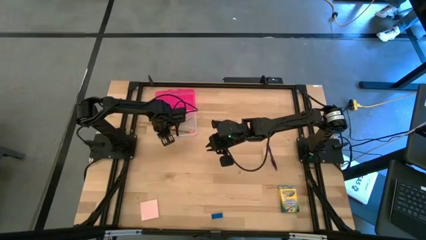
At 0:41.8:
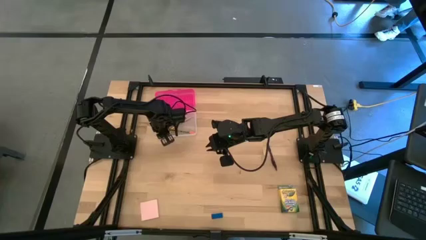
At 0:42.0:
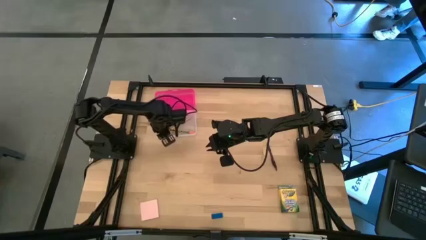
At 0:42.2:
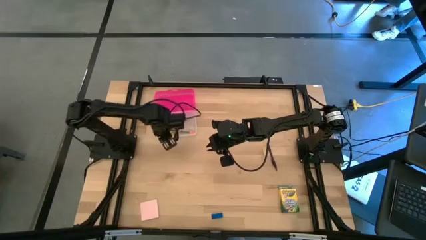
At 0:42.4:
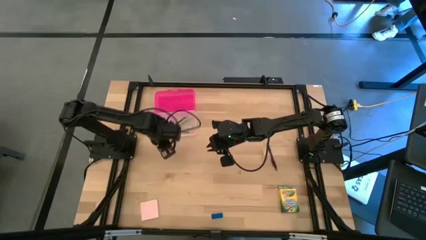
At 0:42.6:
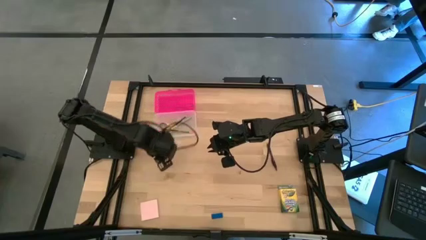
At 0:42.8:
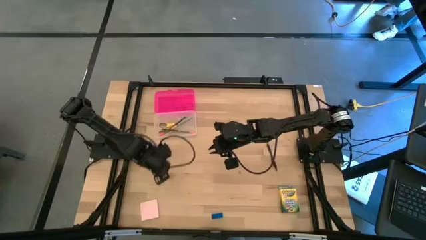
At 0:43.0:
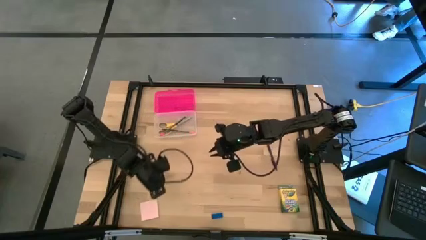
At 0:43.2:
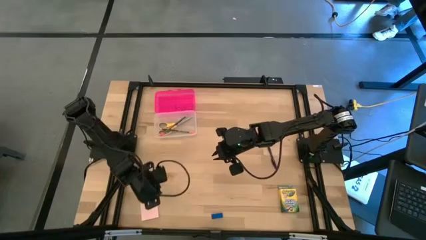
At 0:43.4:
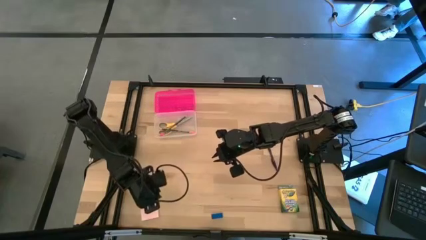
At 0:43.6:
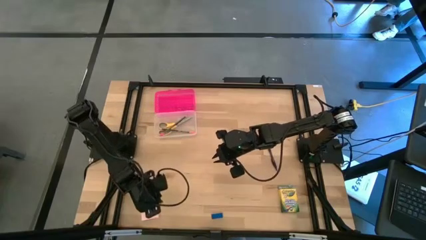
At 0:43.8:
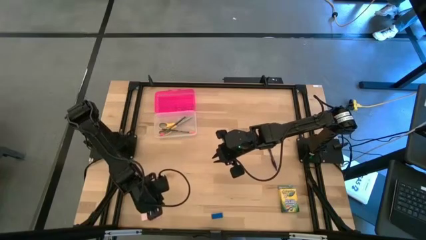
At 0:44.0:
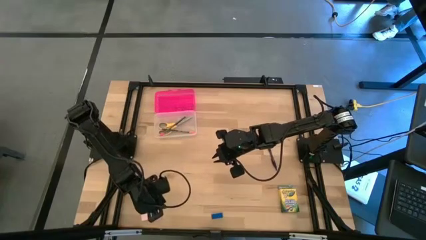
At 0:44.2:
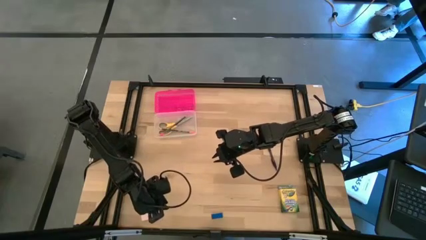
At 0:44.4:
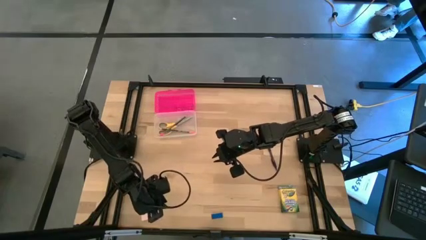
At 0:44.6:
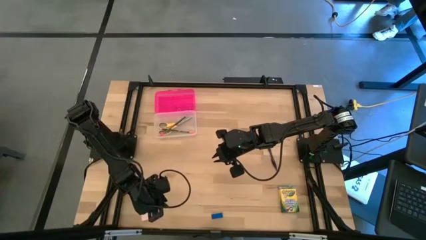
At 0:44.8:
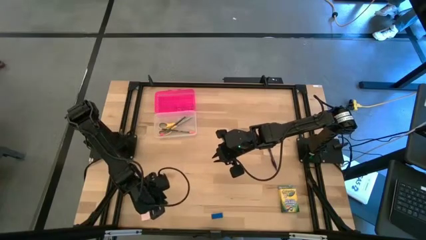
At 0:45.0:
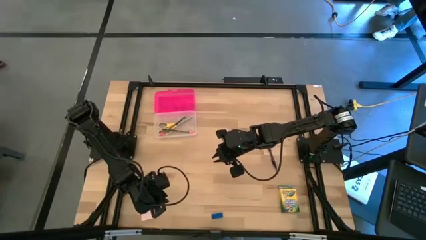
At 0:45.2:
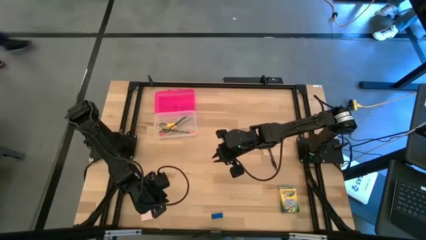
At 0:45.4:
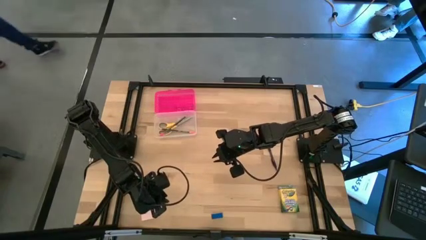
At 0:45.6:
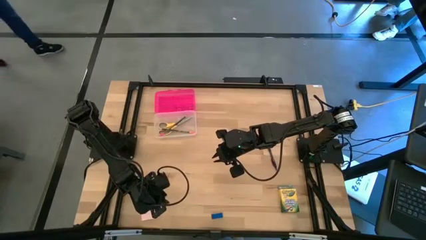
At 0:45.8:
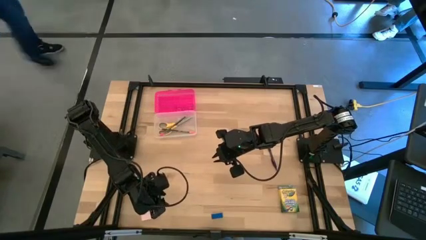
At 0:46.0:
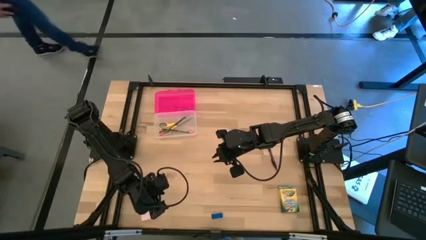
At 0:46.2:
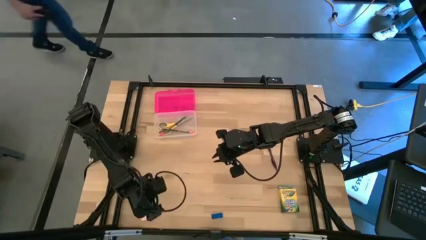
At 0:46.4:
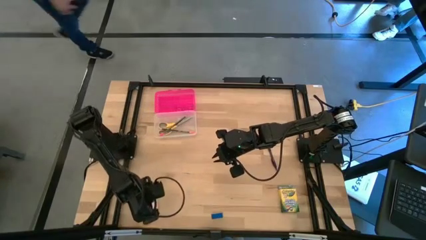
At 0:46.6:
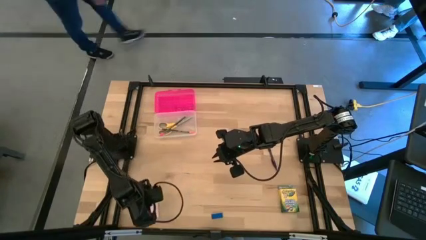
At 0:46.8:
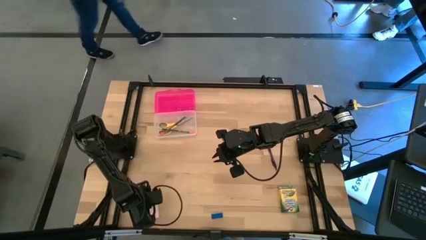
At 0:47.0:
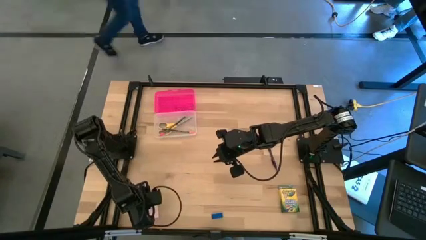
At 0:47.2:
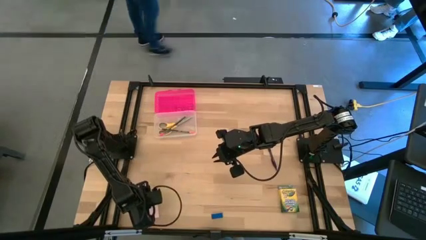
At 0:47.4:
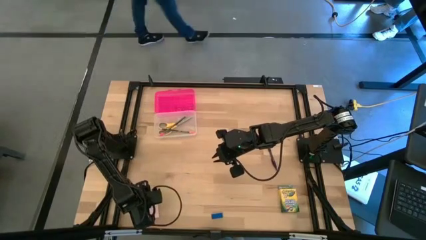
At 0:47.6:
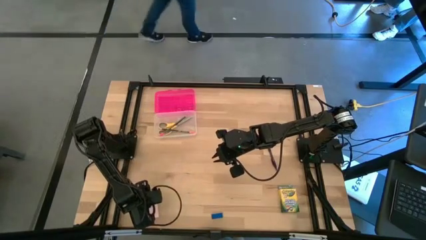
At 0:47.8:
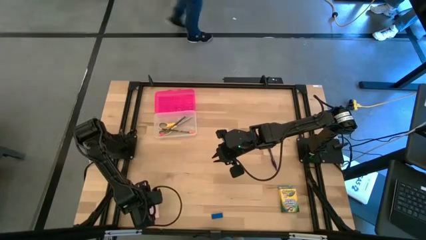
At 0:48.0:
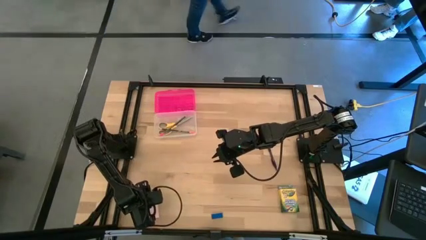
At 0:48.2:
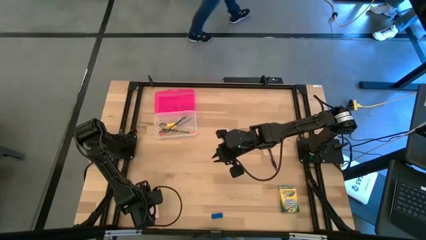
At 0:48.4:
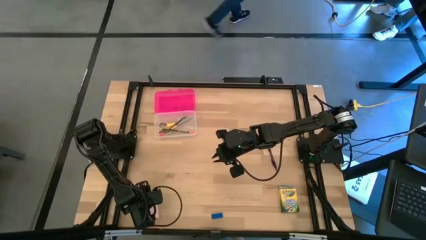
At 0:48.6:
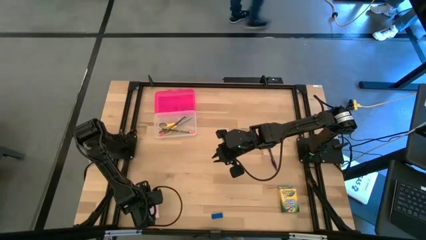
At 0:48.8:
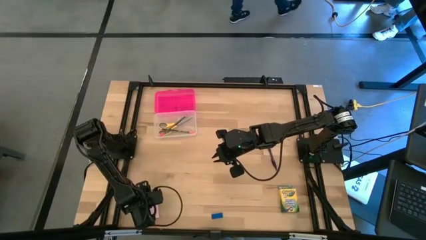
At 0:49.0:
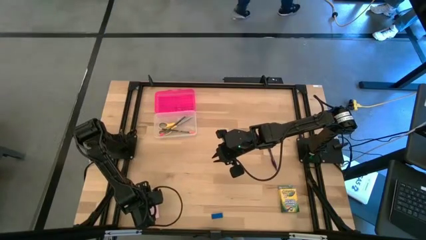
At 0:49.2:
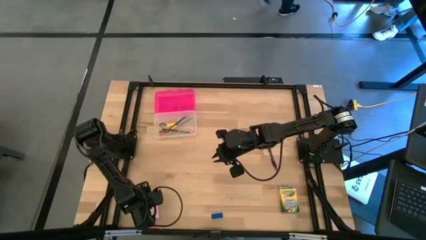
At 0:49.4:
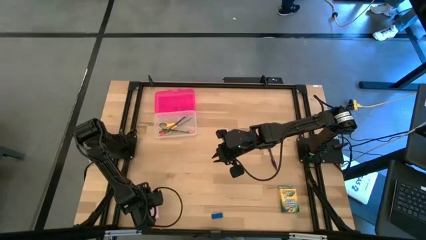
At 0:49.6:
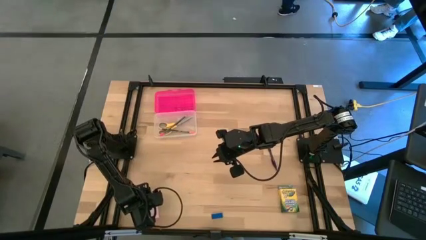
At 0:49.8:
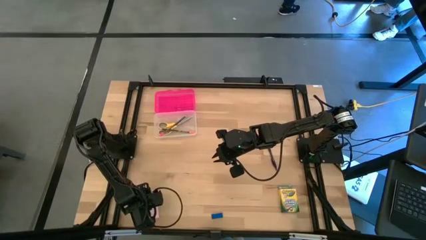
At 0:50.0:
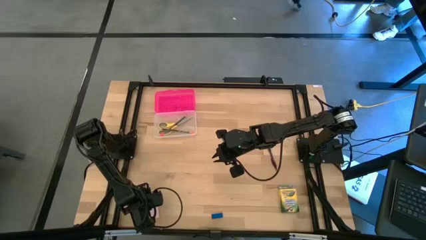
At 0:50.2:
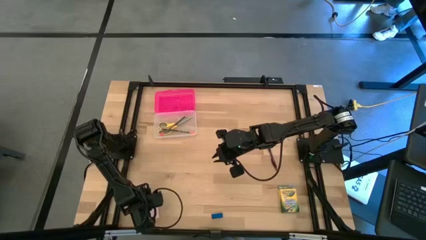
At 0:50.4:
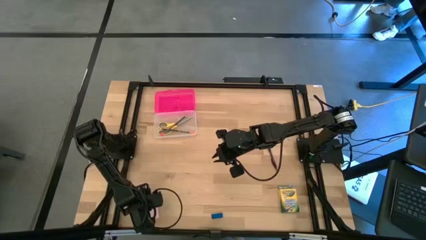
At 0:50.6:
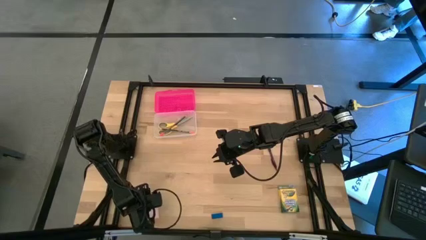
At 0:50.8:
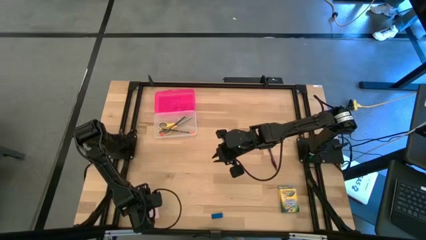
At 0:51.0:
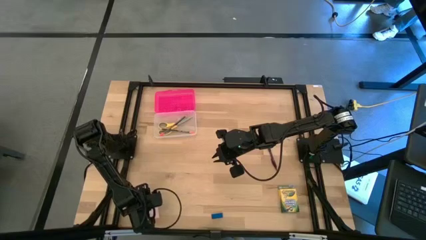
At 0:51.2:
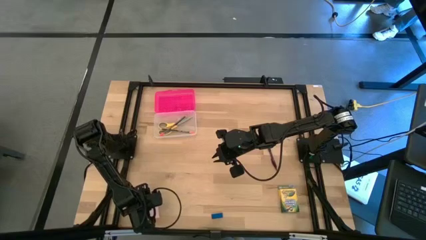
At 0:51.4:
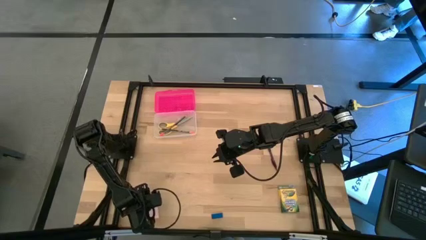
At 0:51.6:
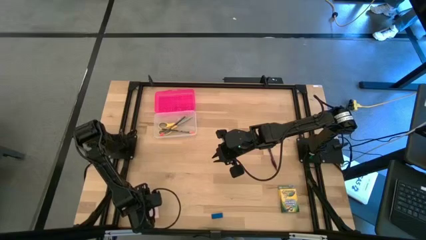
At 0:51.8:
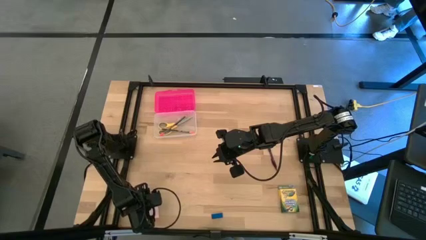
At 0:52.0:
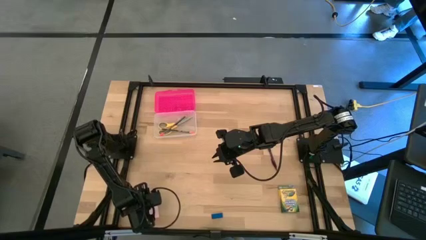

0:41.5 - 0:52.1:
Task: Pack school essentials
Put the light pink sticky note into the pink supply box

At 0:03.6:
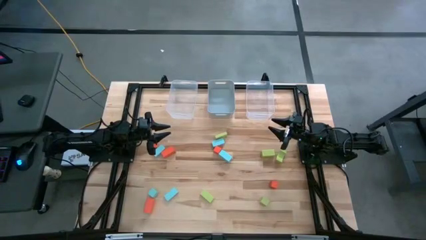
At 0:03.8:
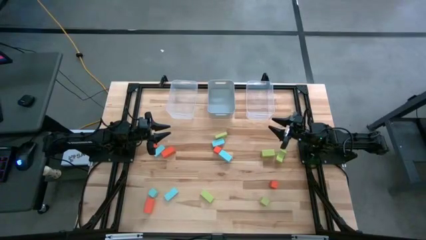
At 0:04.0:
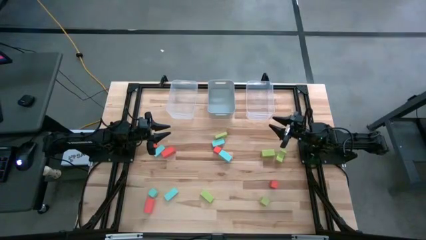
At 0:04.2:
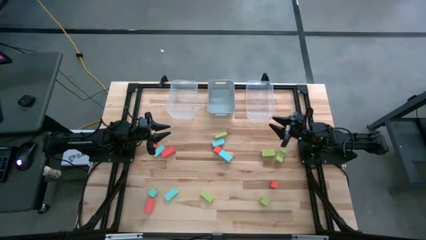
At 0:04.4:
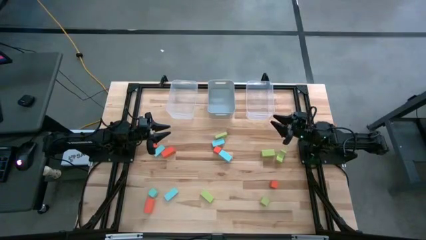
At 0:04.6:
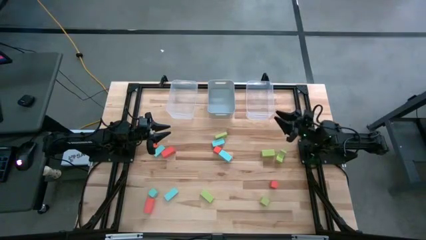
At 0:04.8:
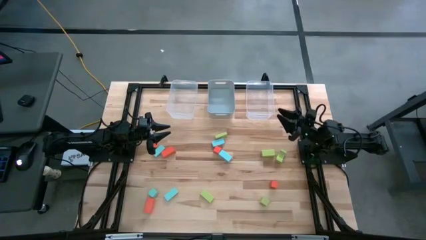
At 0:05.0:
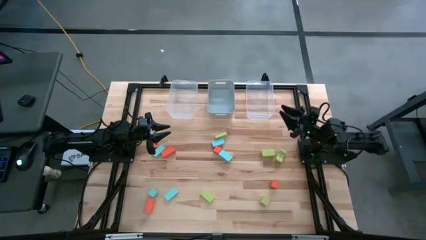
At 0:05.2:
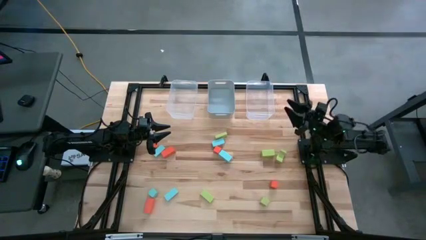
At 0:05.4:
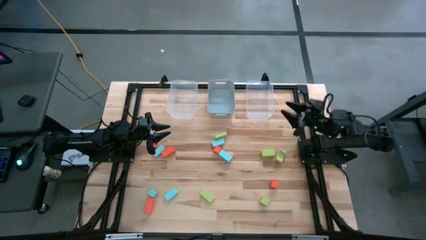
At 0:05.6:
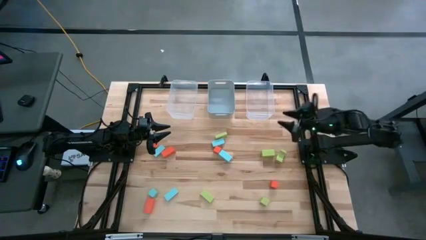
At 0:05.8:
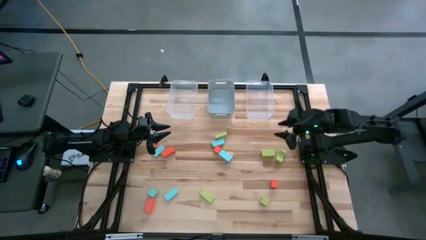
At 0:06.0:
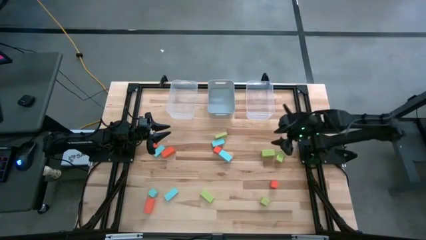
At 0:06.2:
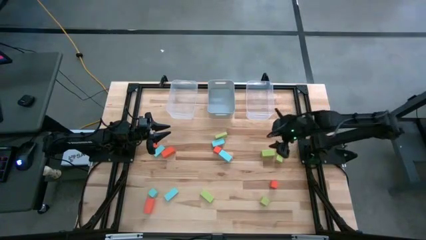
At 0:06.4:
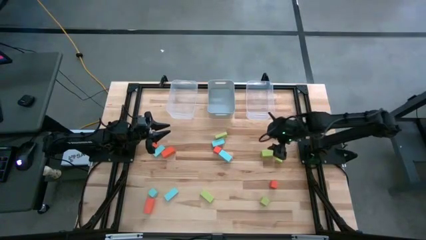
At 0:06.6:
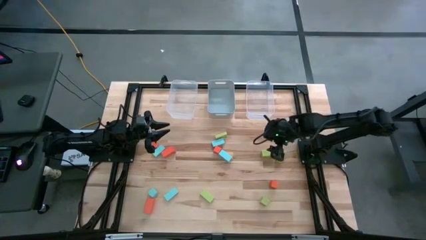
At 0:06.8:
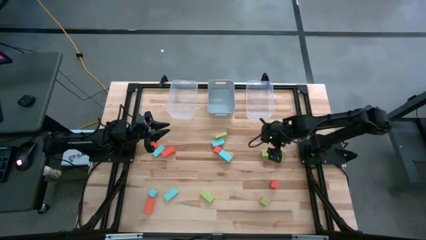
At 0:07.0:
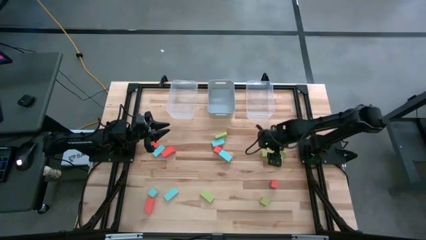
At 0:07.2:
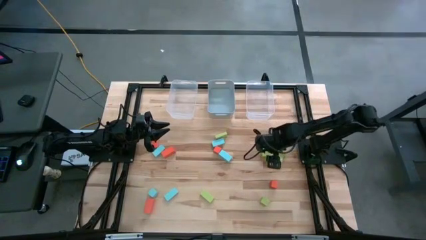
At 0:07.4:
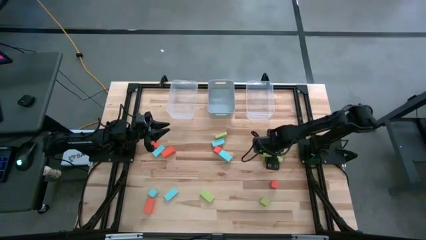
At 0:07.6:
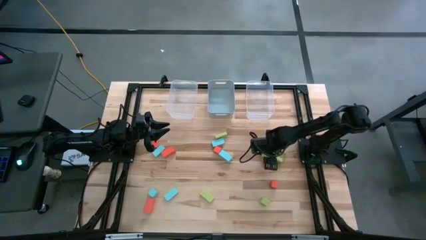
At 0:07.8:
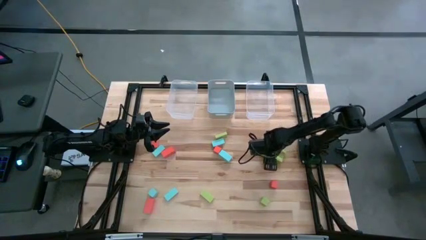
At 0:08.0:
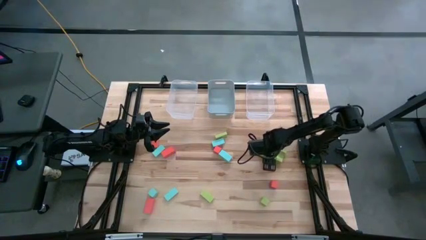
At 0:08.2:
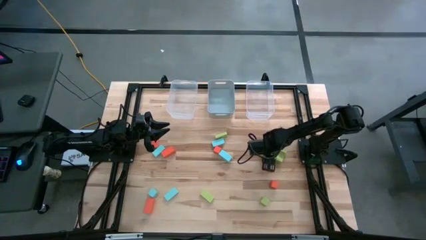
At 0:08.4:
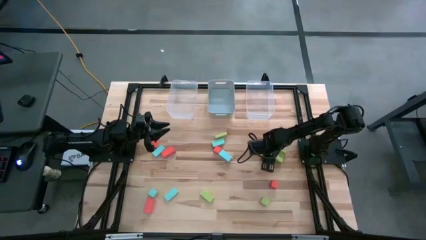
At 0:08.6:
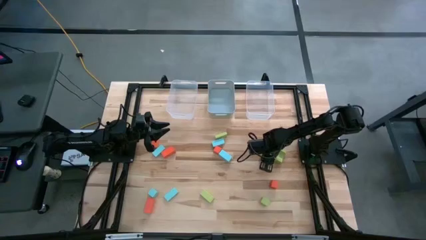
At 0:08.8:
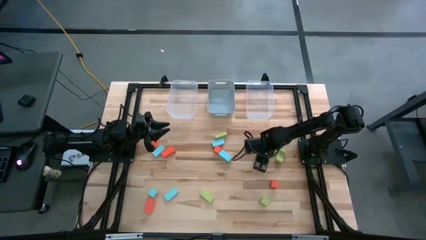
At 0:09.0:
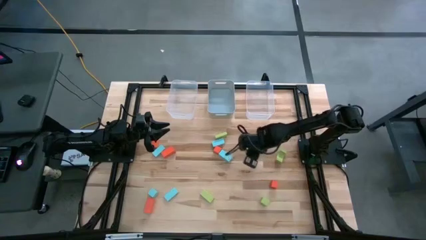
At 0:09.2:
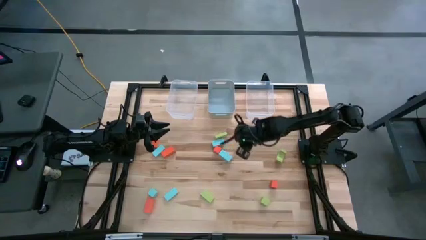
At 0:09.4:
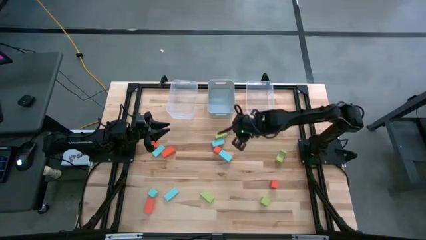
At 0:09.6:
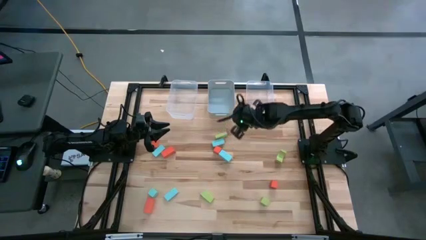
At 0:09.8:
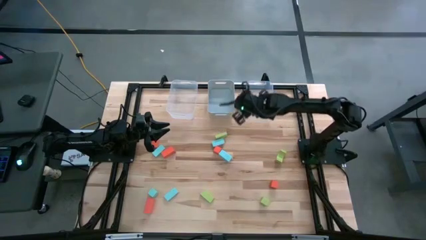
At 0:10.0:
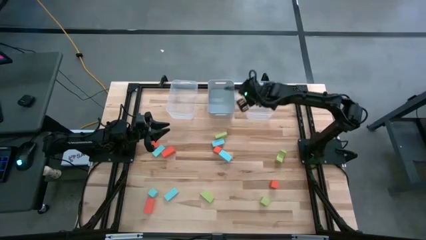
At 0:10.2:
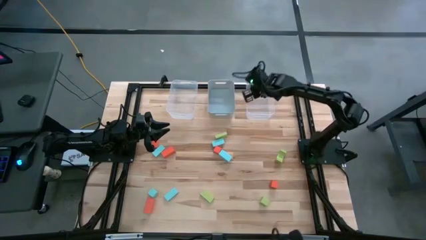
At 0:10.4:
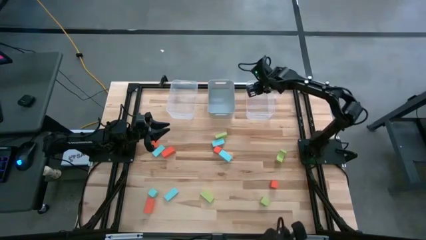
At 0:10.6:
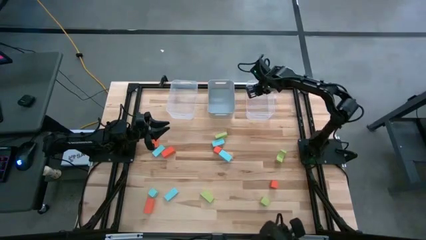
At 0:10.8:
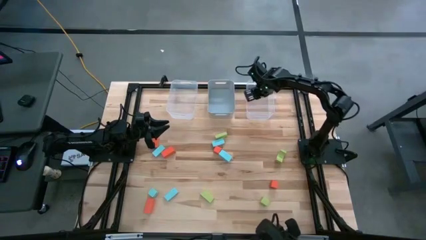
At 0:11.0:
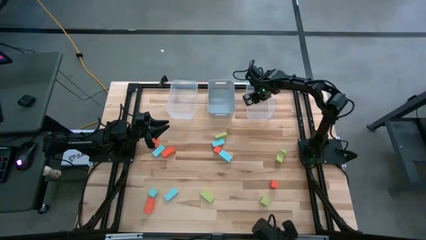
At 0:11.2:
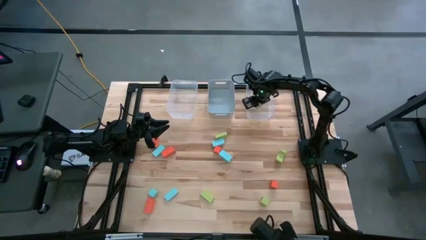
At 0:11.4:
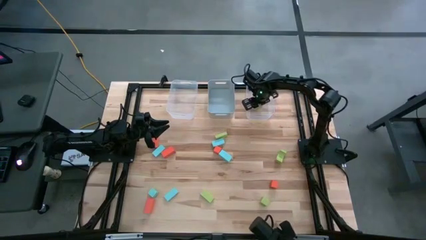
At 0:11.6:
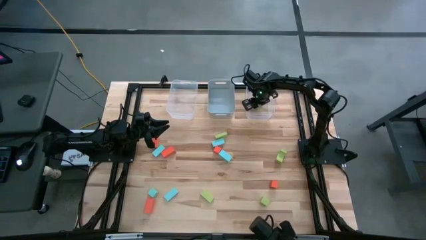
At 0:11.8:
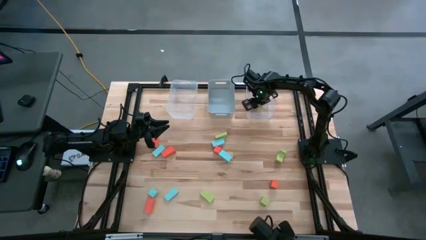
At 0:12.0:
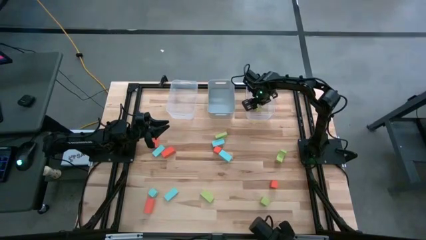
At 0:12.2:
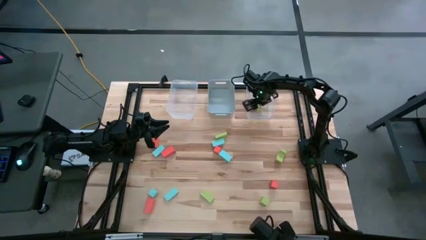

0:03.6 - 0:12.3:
Task: Sort & place blocks by color
Put the green block into the right transparent bin
